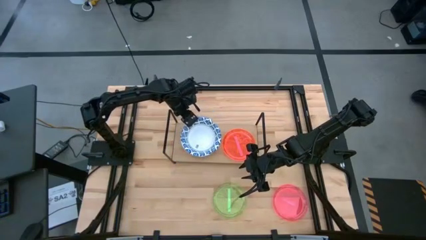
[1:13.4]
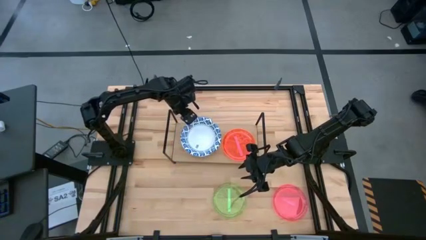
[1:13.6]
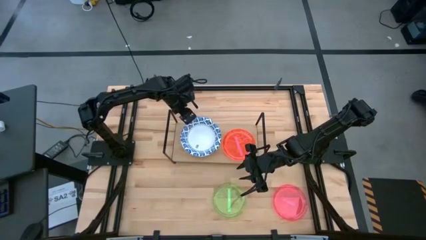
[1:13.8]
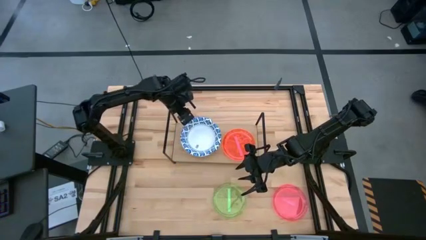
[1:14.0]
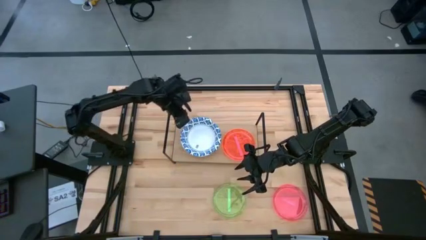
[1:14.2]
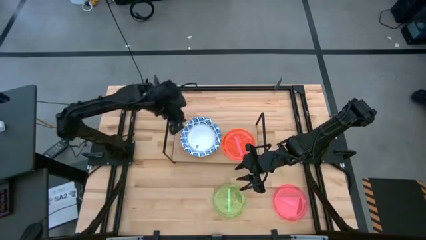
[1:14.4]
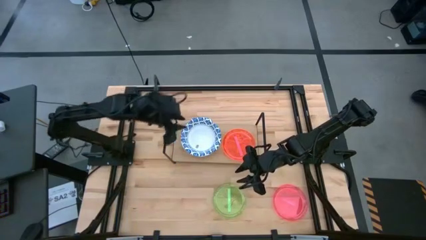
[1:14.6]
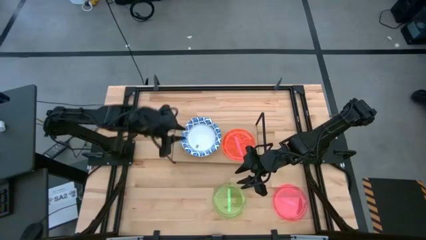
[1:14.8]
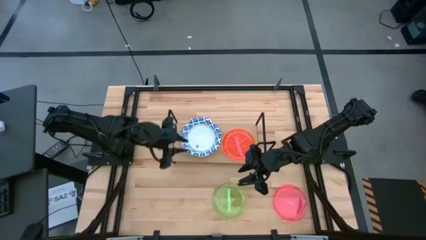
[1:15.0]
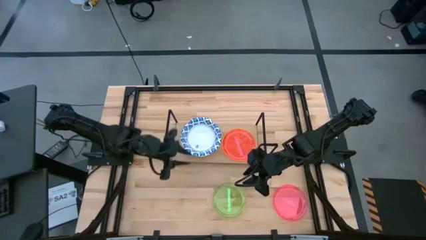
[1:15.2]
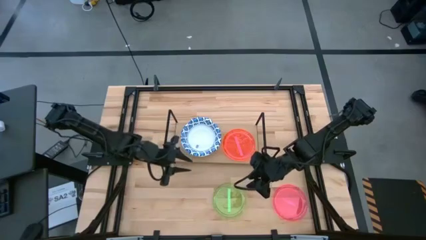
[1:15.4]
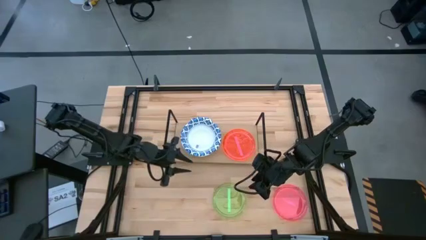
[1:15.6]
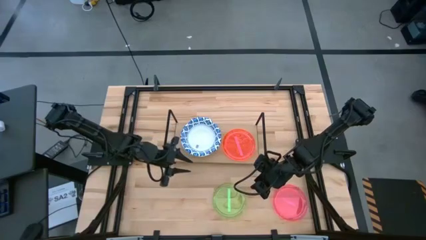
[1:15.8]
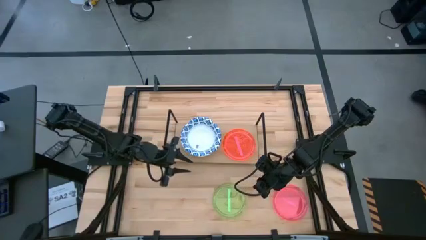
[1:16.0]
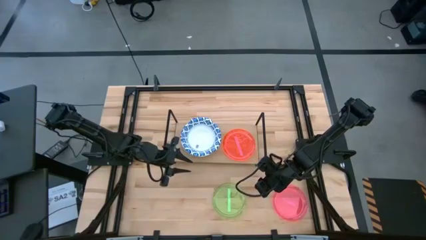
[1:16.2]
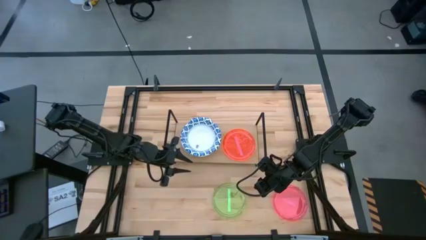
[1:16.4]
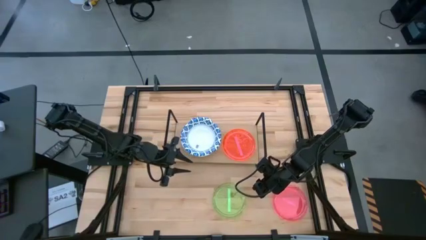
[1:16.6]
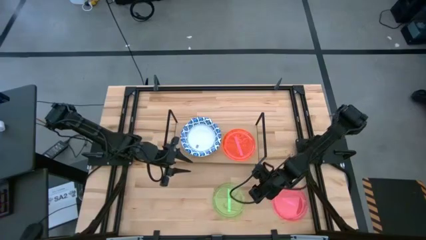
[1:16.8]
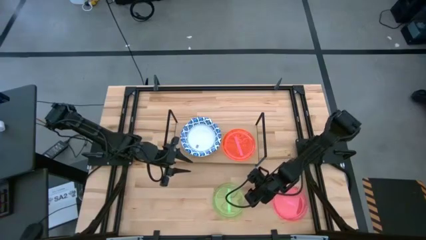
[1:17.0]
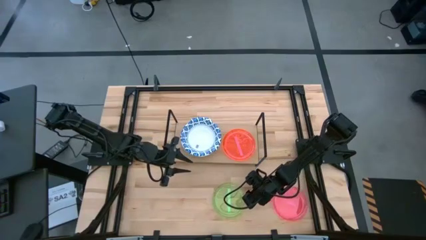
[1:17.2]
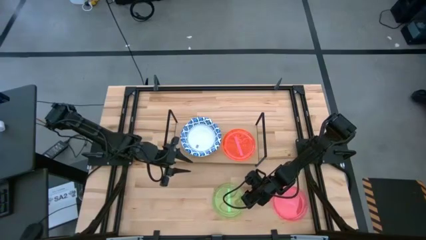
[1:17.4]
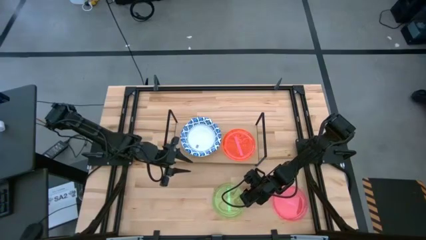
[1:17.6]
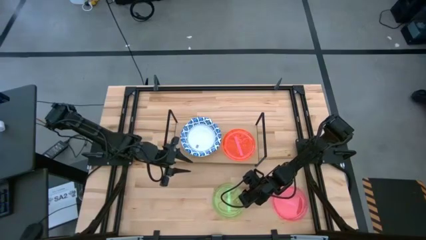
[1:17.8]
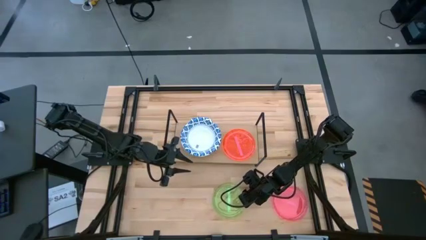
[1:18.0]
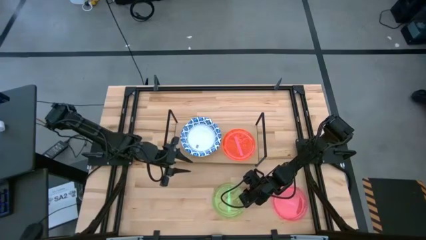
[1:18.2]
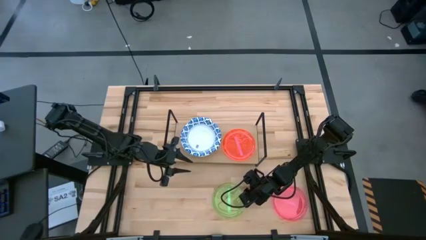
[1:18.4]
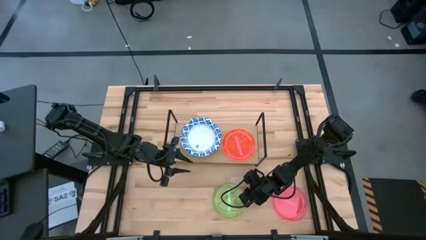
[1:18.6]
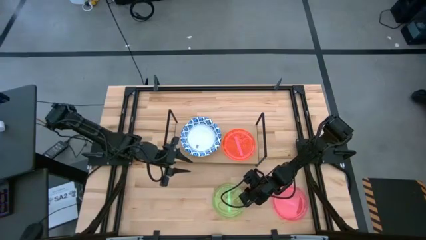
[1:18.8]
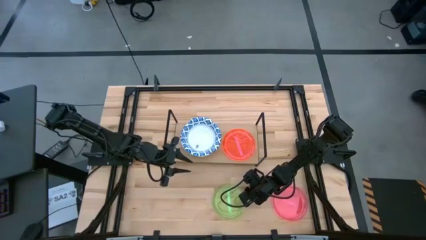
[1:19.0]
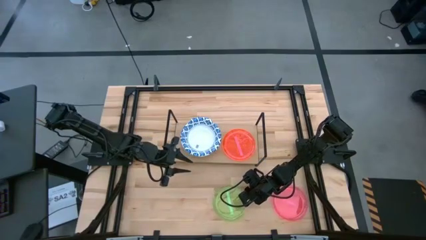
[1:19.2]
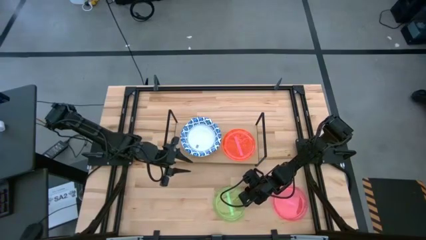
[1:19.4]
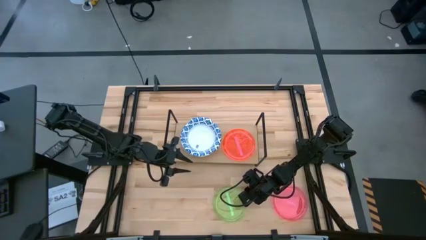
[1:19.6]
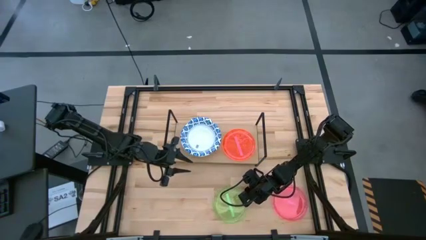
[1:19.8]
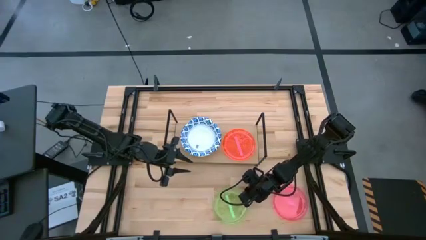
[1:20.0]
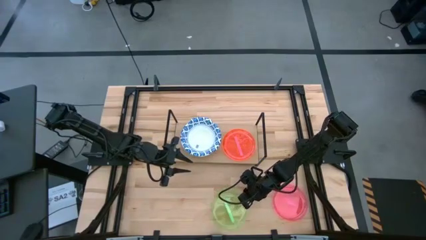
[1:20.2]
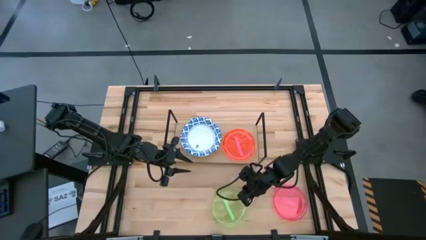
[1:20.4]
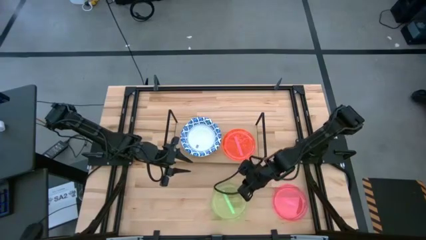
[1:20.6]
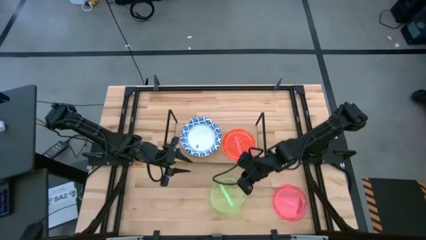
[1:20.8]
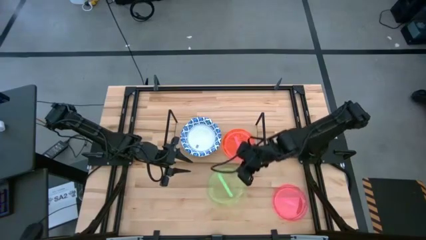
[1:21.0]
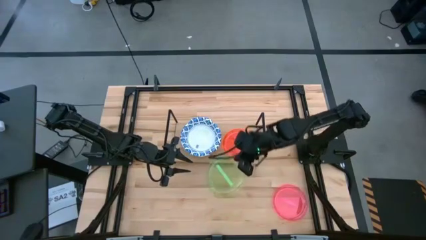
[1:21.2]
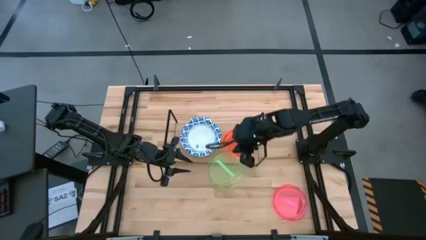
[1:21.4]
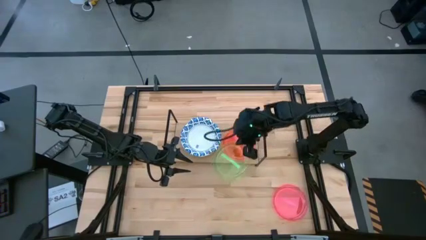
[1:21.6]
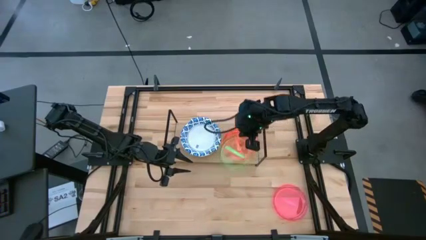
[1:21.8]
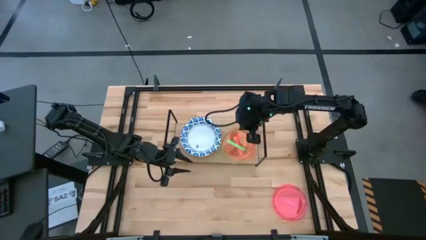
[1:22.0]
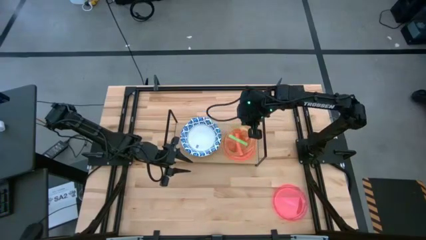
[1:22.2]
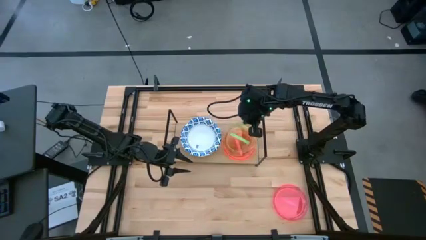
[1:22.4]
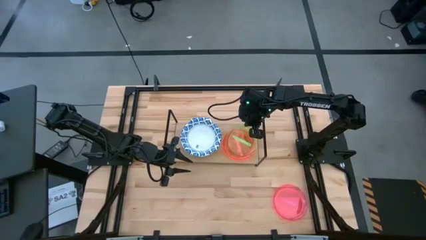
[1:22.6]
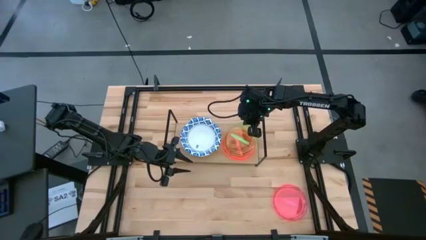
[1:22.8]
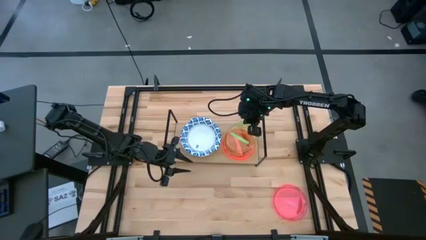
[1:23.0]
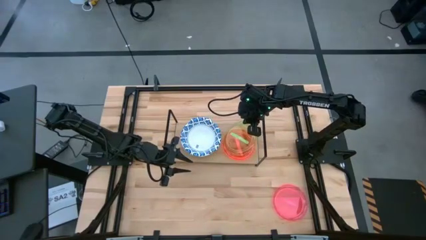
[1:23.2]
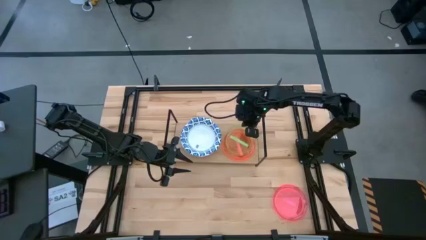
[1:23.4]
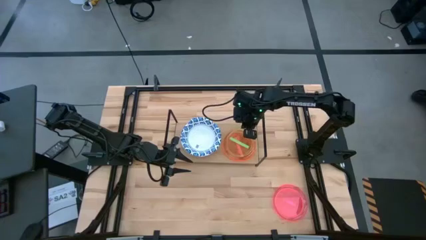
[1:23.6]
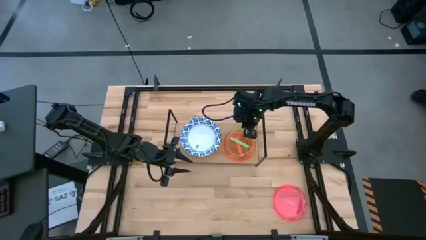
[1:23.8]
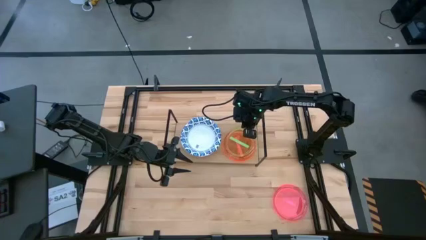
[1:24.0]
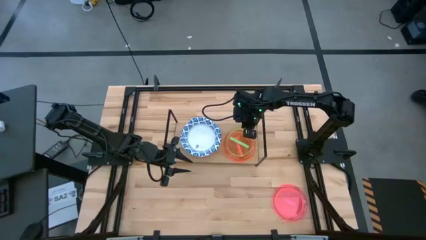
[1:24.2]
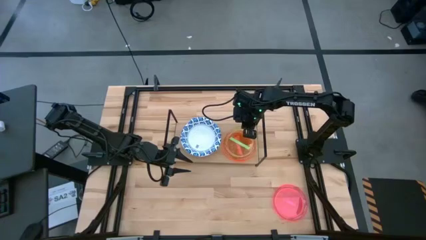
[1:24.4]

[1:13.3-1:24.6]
Task: Place and stack plates onto a shelf
Stack the green plate on top of the pink plate on the shelf

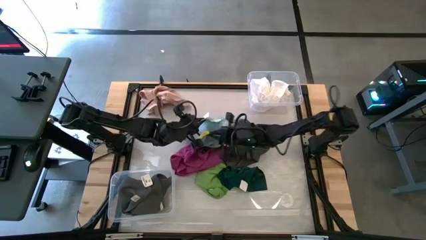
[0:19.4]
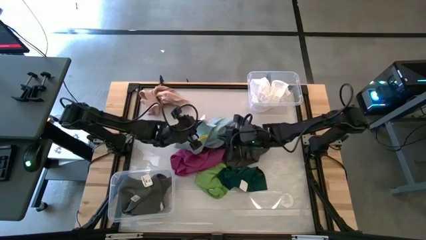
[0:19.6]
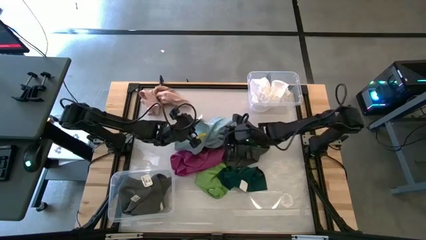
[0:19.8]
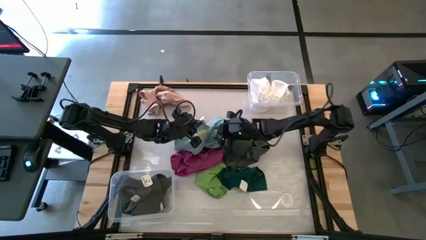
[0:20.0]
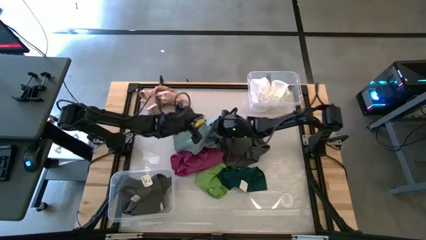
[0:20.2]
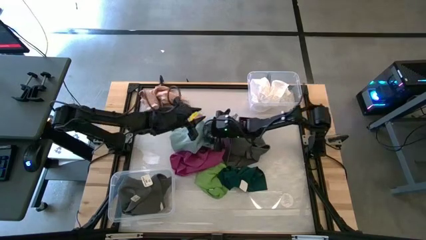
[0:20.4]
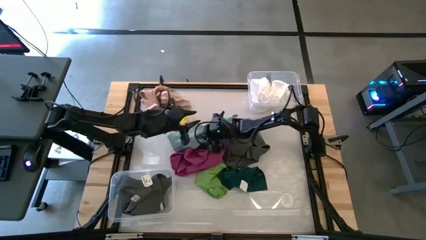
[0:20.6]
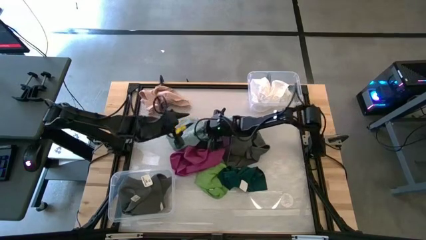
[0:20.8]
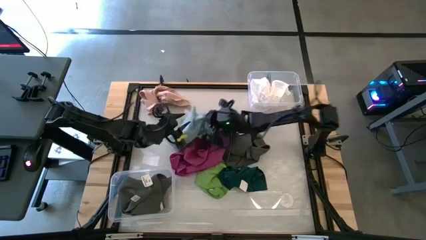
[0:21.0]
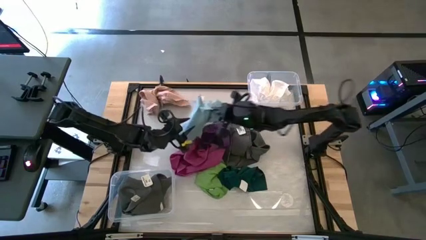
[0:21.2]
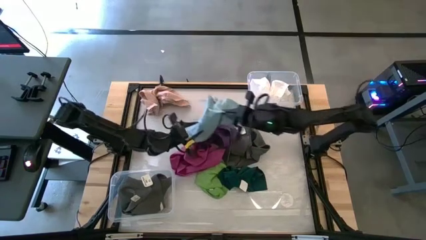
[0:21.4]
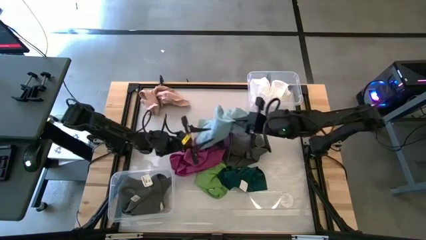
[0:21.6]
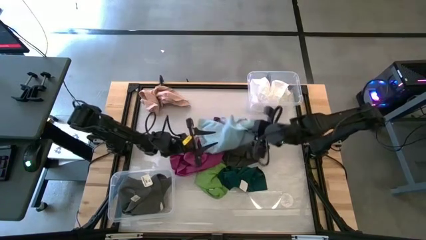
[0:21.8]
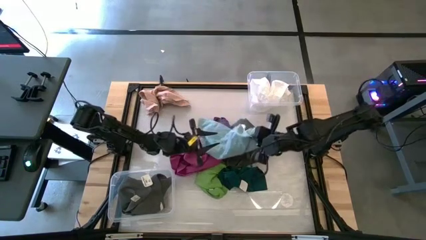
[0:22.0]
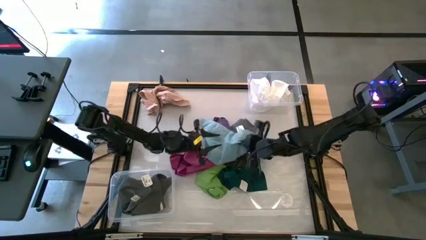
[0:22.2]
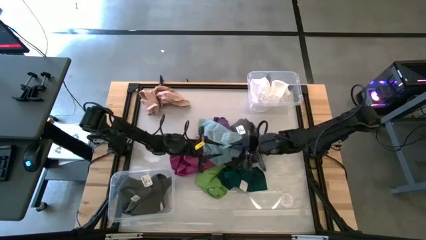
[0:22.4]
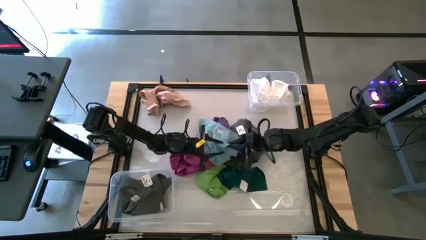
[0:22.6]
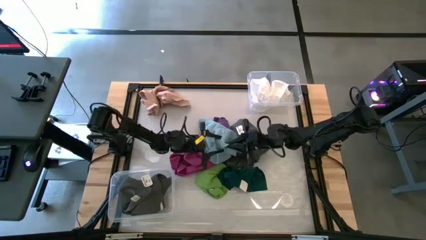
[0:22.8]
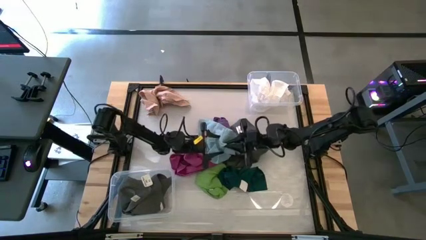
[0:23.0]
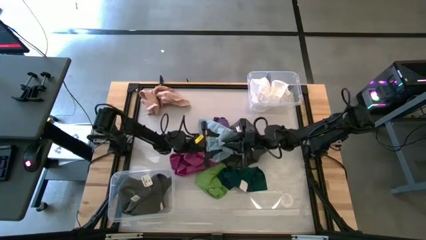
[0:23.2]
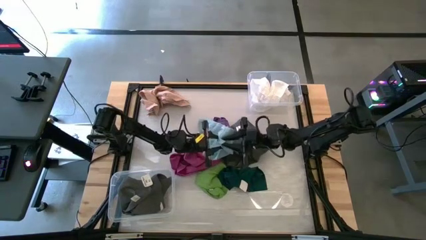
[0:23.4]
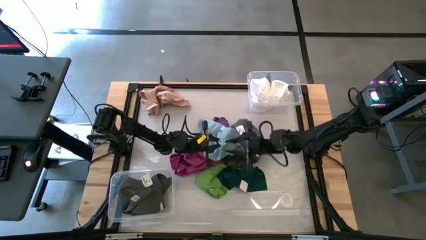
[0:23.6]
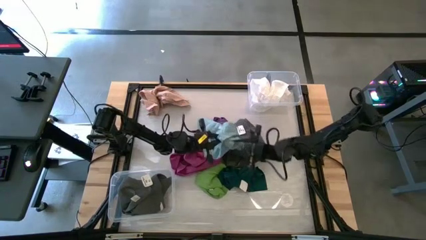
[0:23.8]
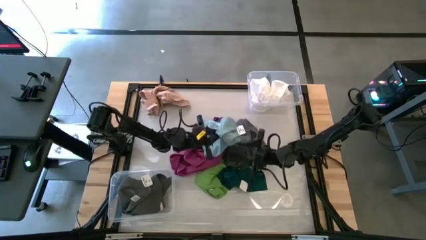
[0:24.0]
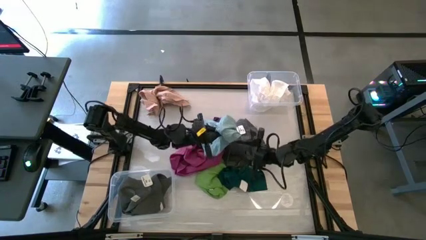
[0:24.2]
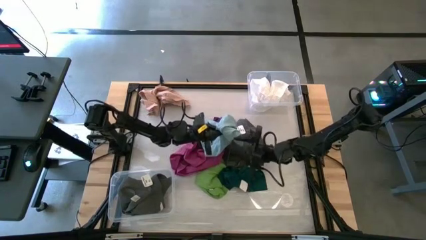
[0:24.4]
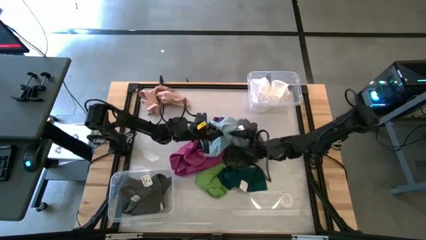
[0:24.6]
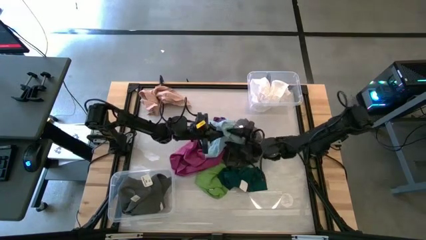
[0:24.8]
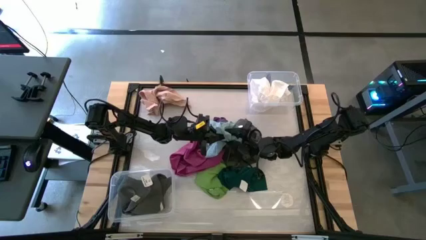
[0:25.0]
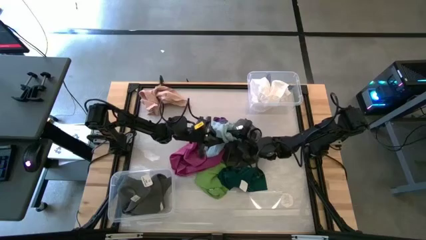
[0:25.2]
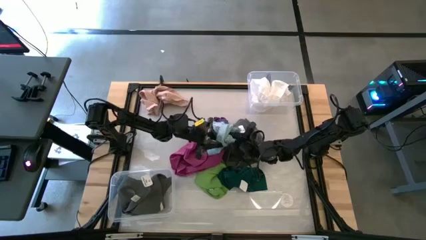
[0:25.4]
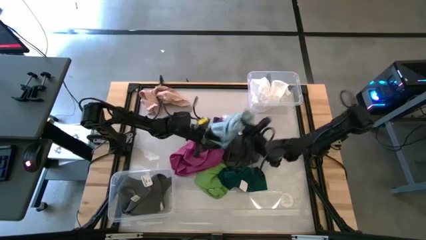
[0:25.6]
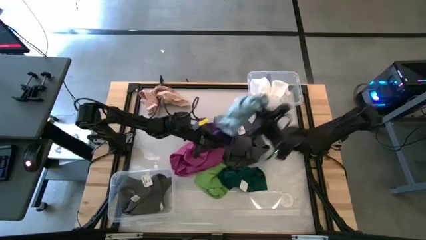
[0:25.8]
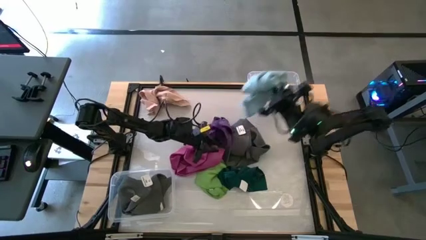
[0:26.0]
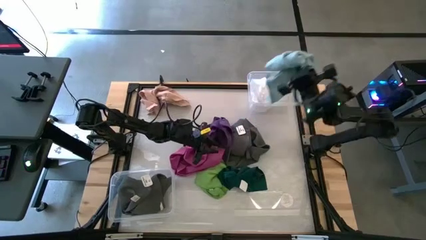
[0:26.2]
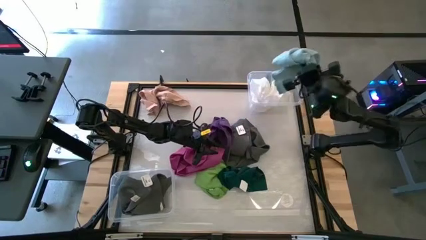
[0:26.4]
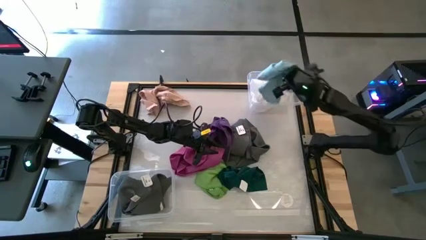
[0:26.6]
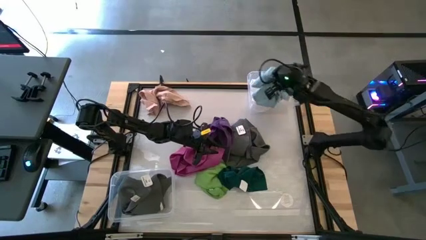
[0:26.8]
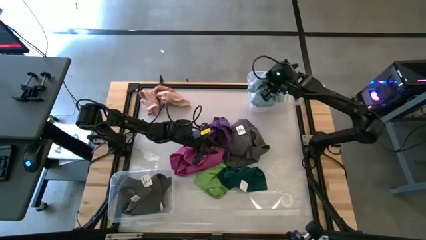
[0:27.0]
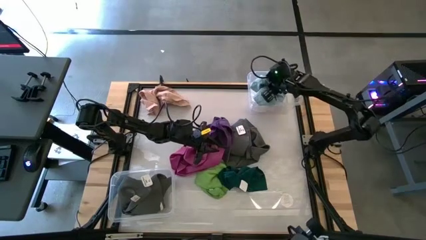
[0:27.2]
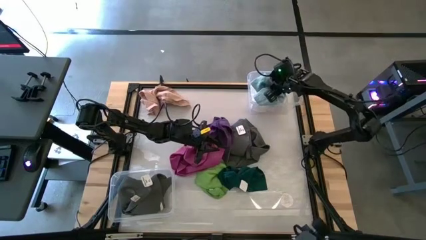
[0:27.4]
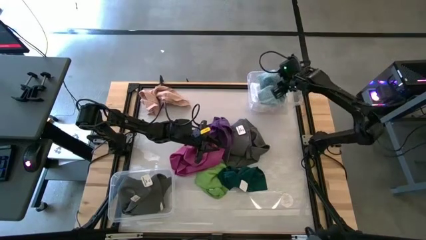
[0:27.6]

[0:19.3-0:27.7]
Task: Sort towels by color in basket
Put the light blue towel into the top transparent bin
